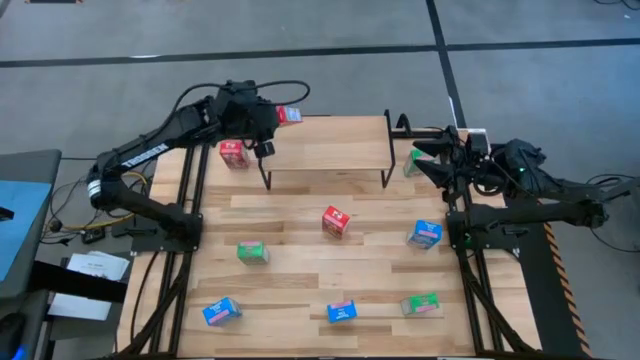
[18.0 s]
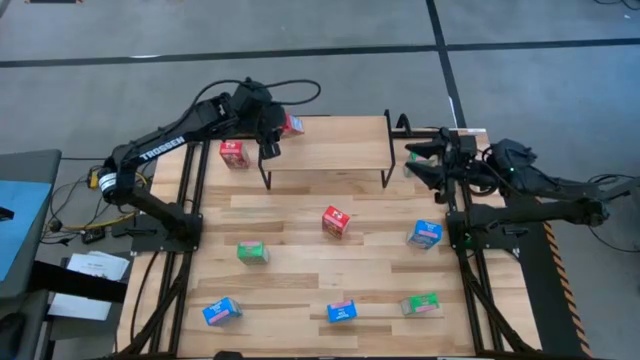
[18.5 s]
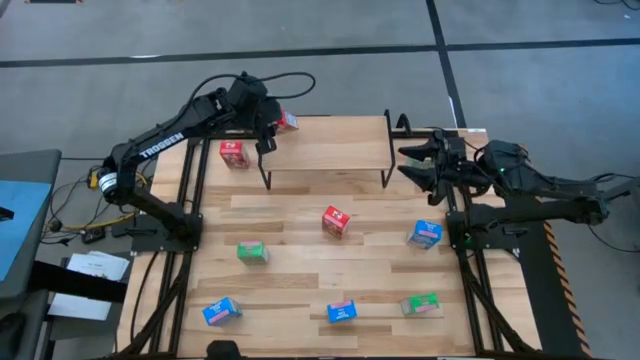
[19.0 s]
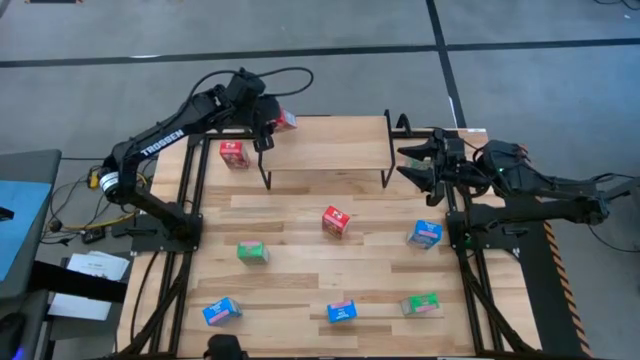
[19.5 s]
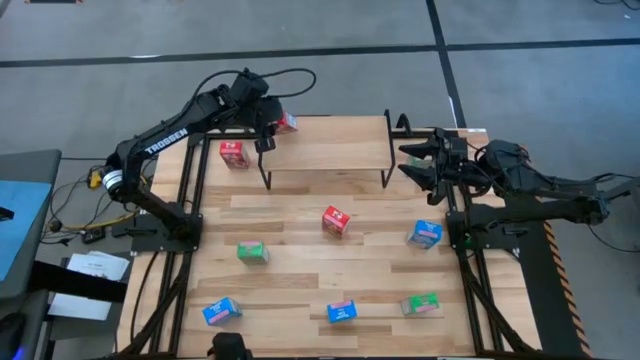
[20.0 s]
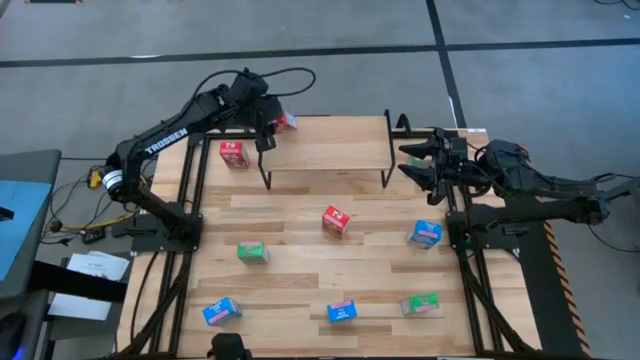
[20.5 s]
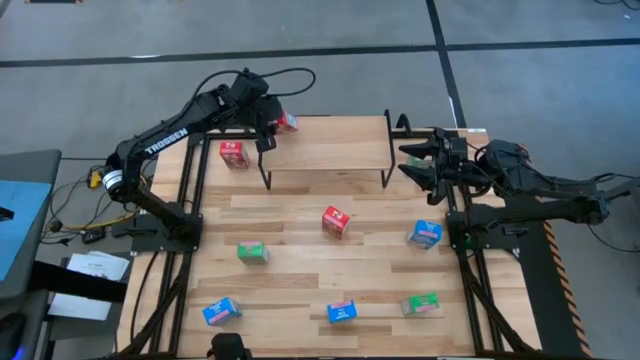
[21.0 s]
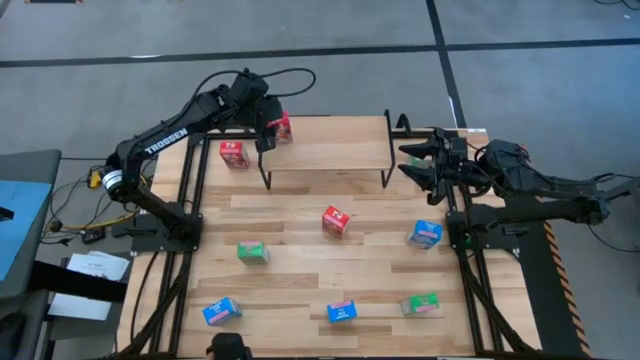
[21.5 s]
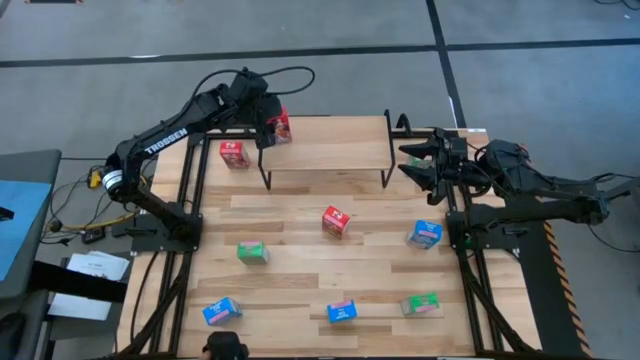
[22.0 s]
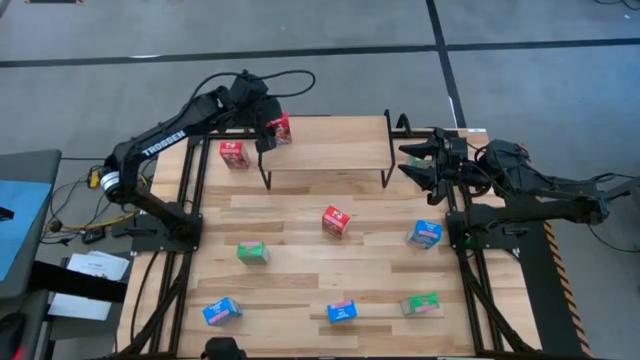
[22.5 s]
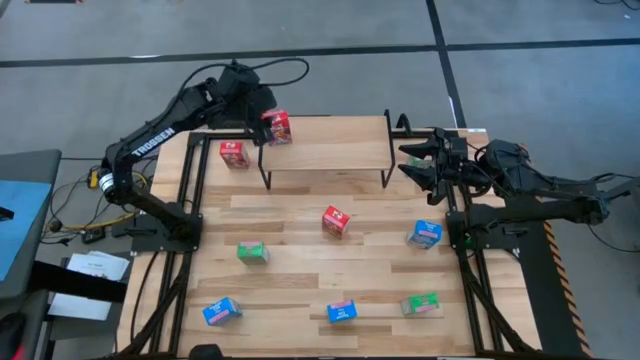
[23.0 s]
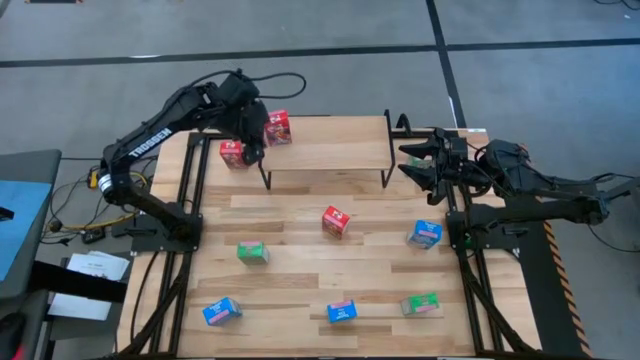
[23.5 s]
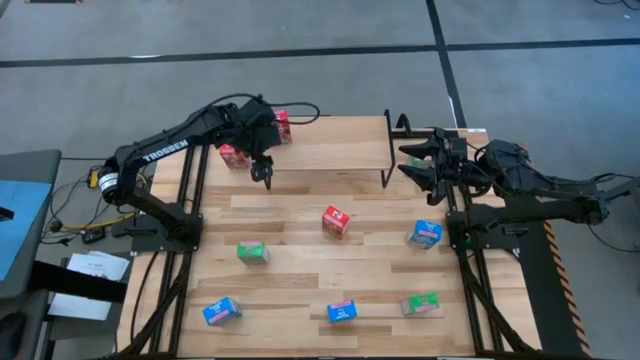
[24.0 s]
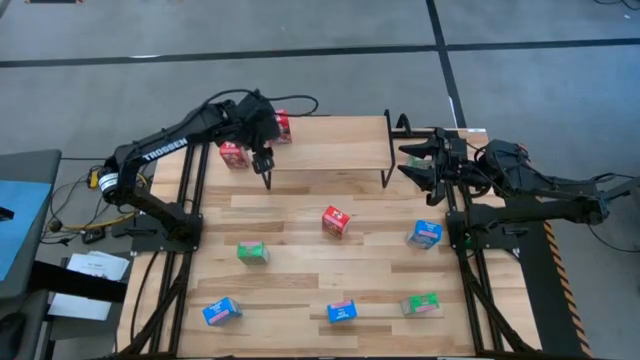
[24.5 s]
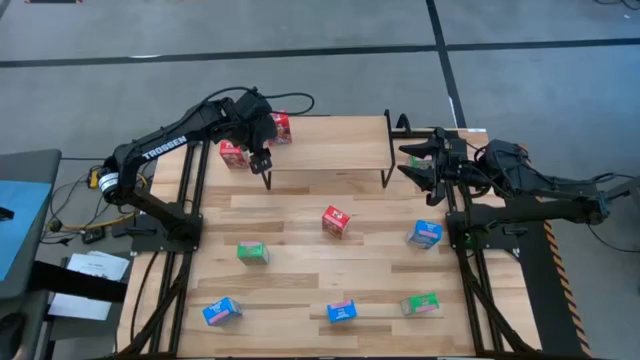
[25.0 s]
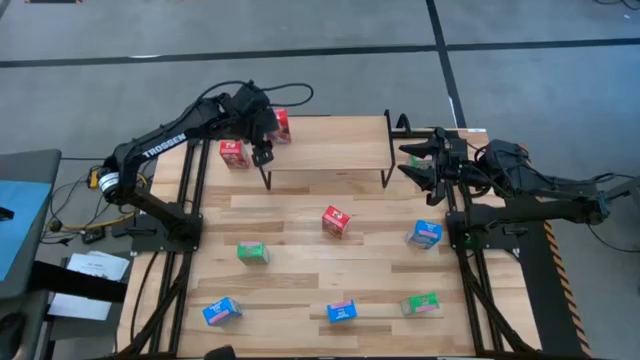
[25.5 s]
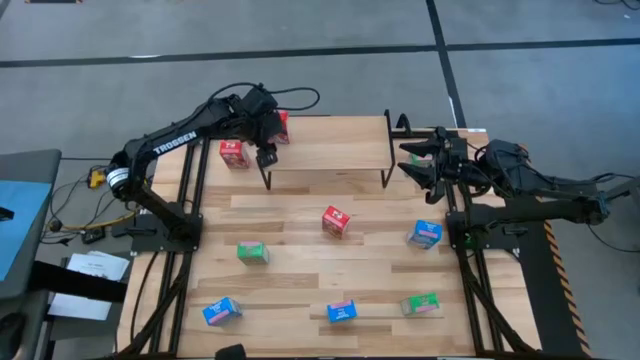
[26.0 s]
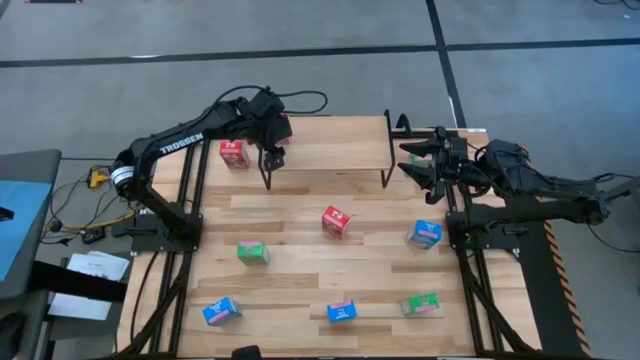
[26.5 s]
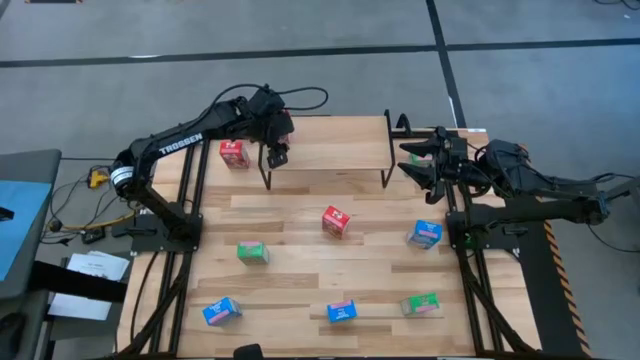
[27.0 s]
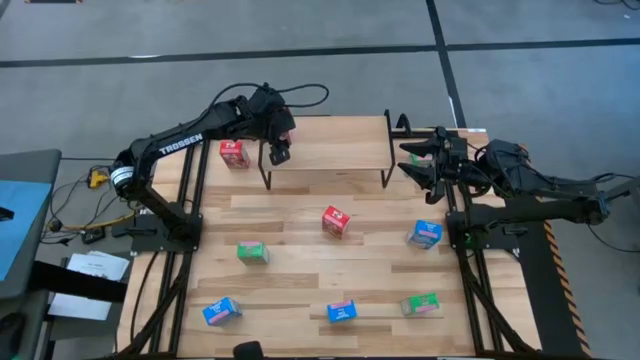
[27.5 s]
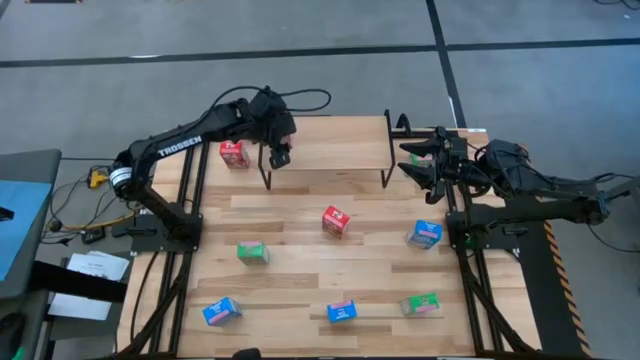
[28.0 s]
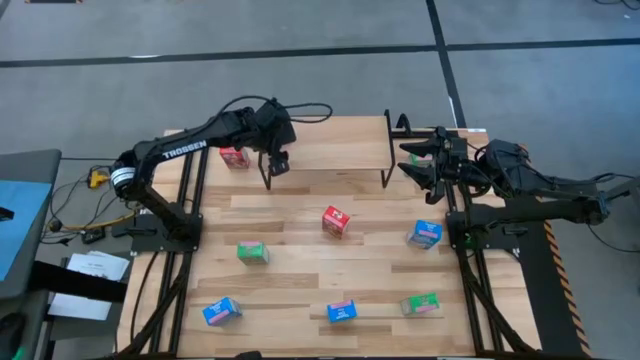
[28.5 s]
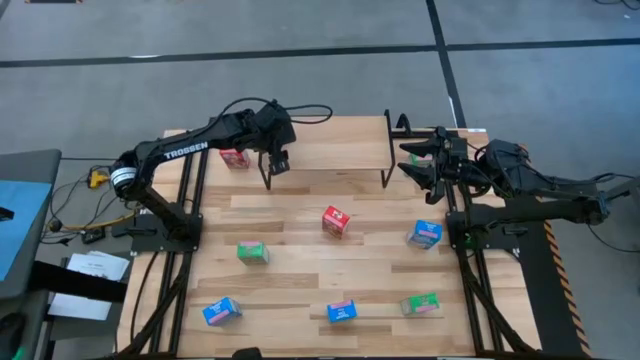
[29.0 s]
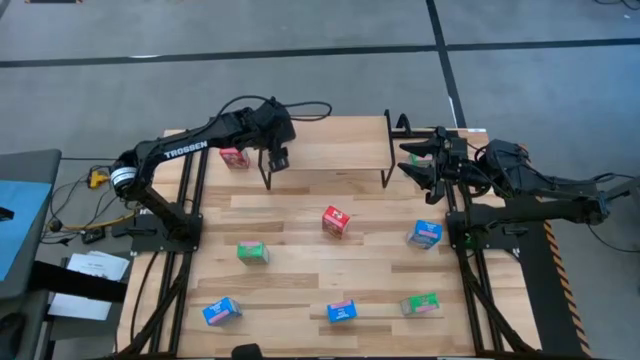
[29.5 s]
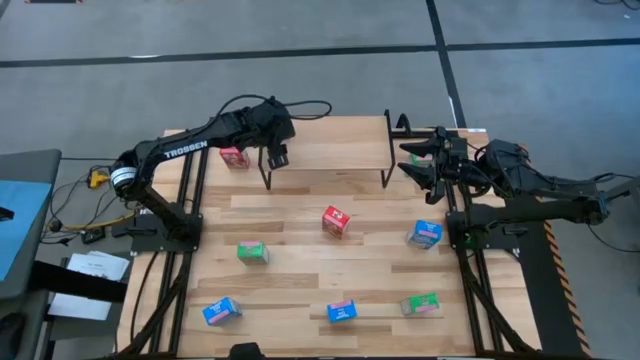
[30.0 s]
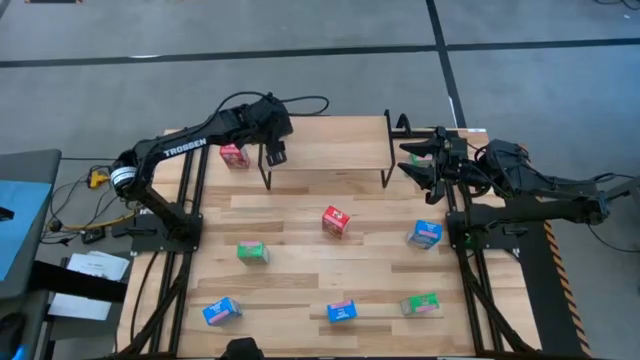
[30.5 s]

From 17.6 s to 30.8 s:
Task: Stack cereal on shelf
Put the middle left red cereal box on the shelf

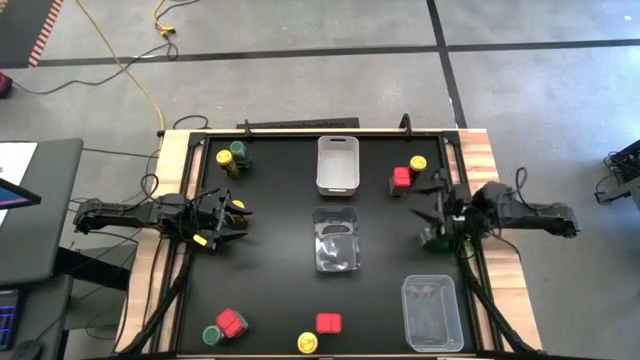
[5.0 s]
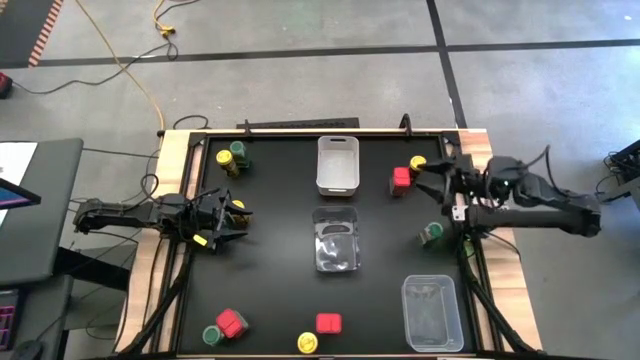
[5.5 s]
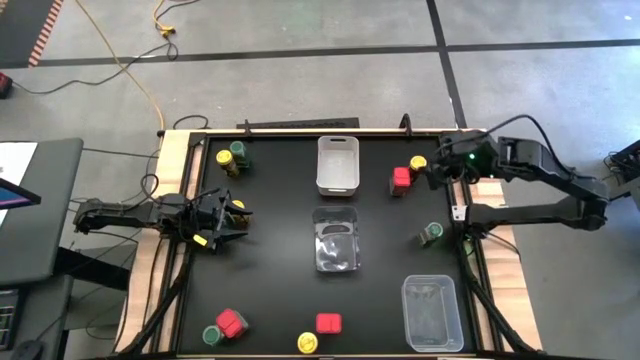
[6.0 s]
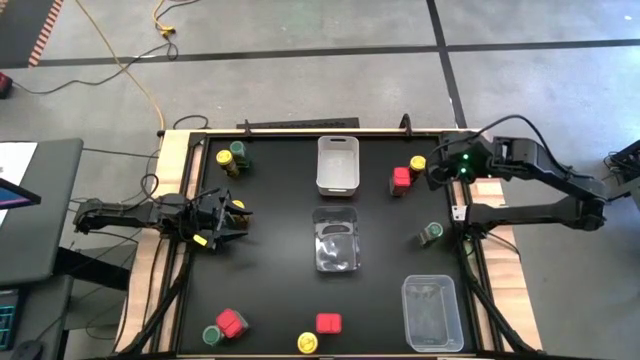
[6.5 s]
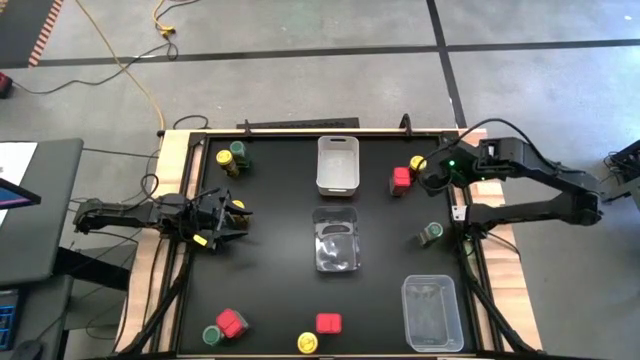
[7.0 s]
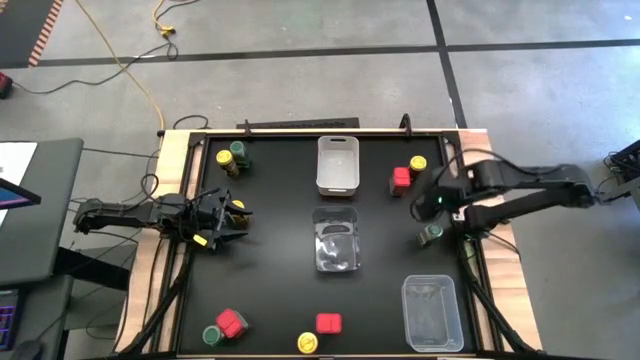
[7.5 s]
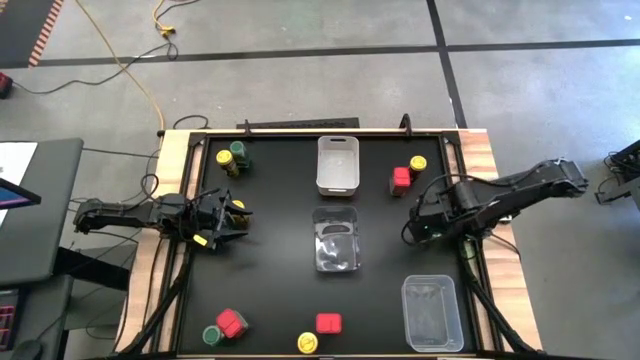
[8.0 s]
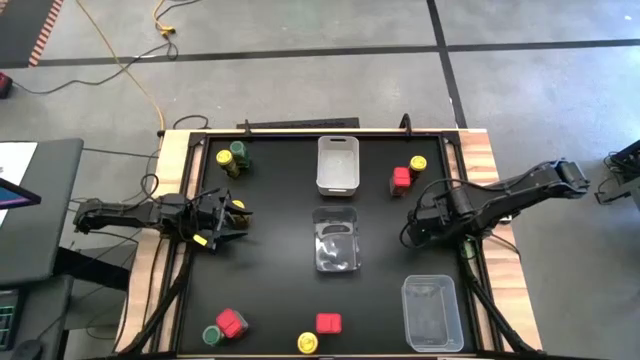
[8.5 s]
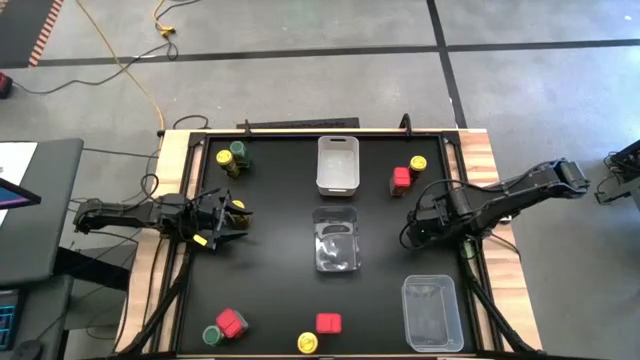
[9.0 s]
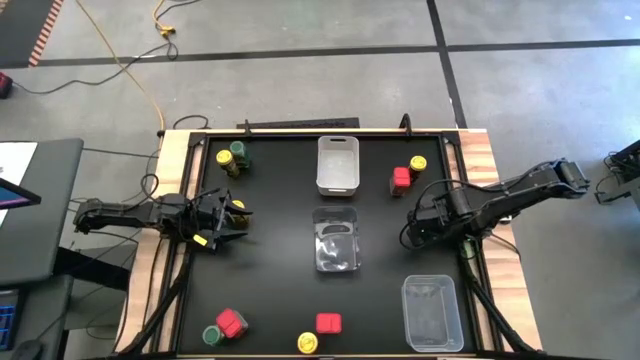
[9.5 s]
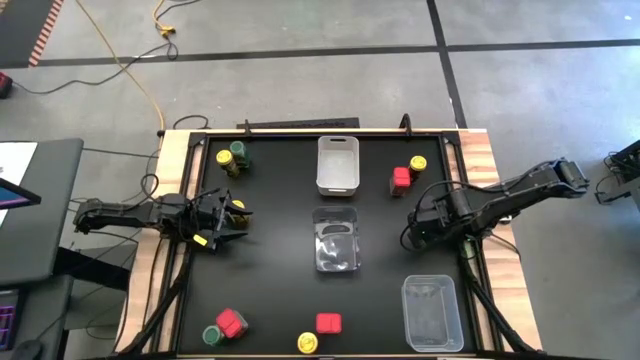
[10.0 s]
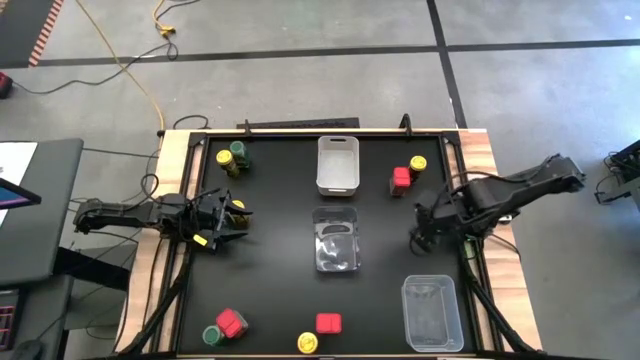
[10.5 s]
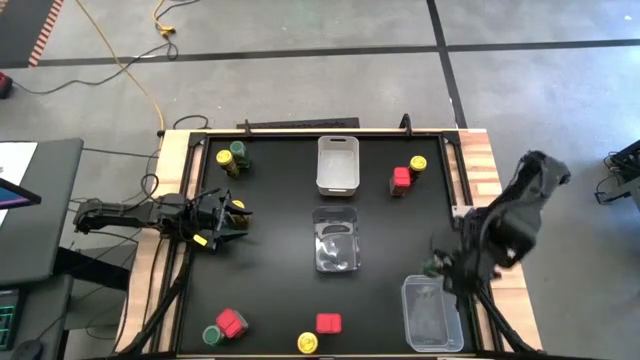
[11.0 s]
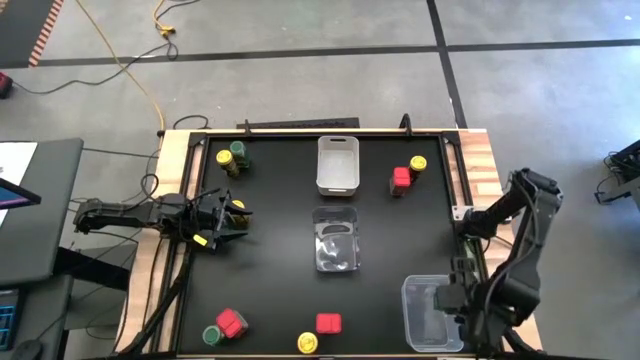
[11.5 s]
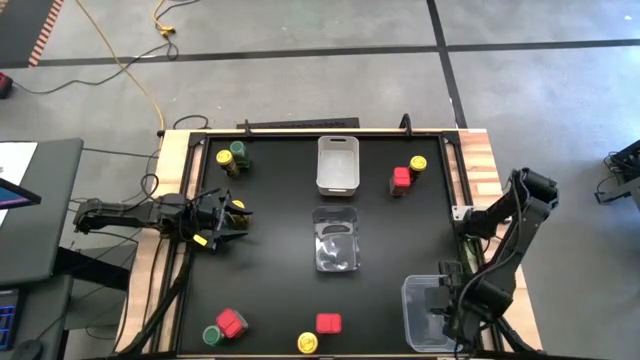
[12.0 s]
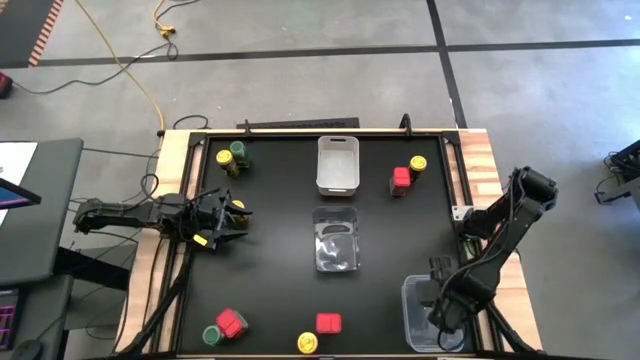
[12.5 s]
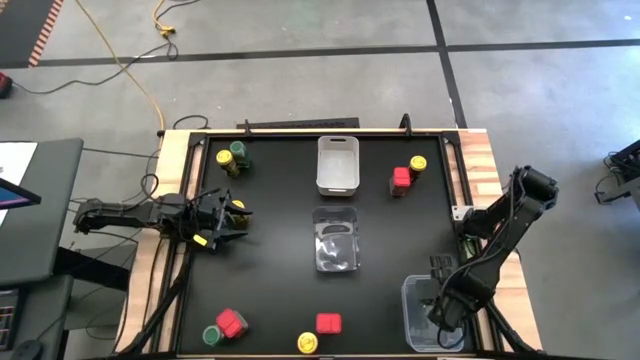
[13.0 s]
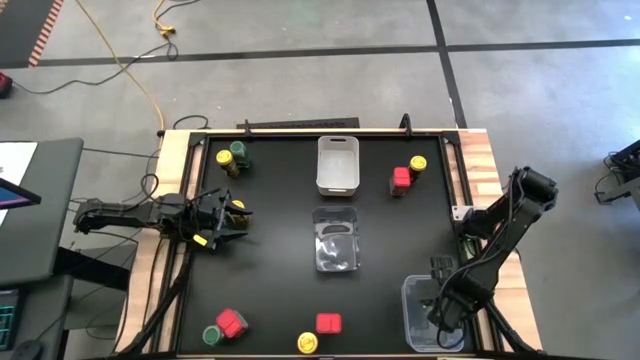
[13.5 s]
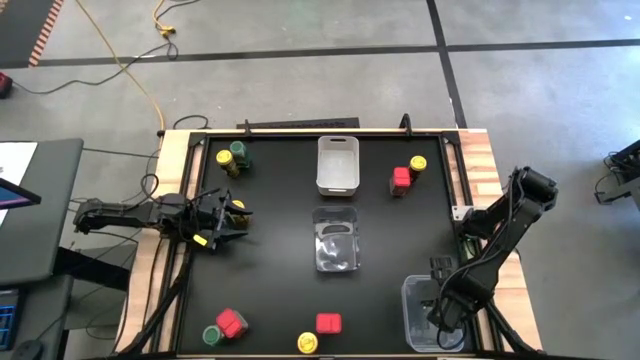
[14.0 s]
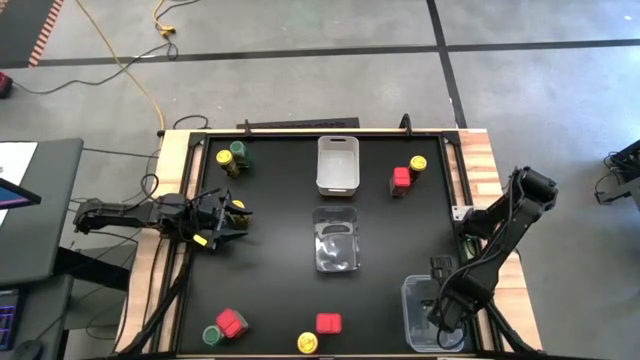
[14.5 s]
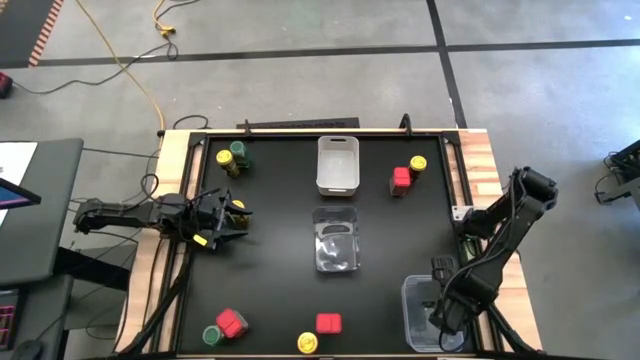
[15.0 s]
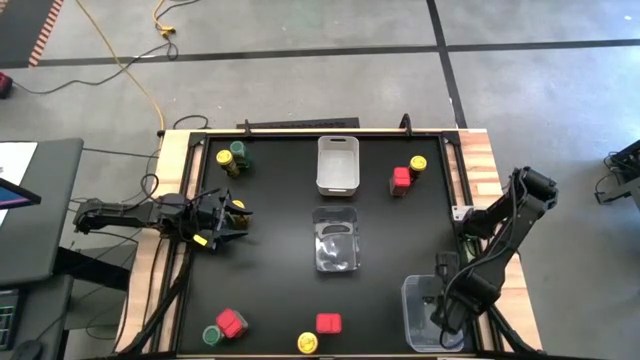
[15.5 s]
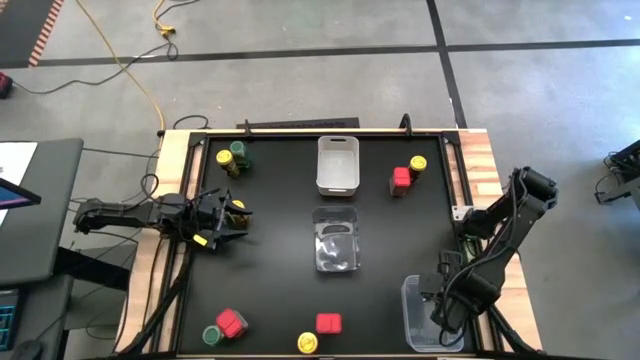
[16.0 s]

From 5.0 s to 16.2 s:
Task: Sort spices by type
Put the right green seasoning bottle into the transparent bin
